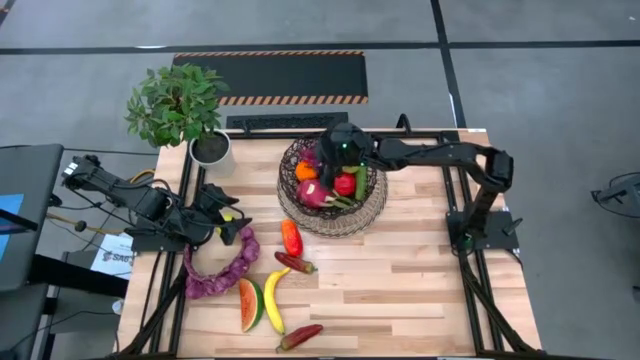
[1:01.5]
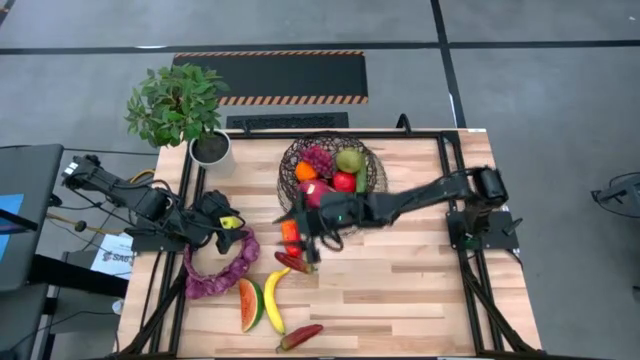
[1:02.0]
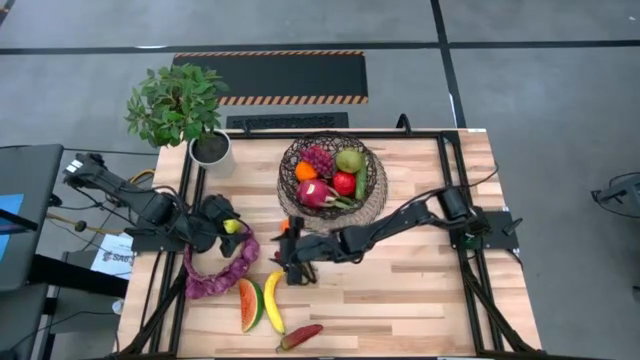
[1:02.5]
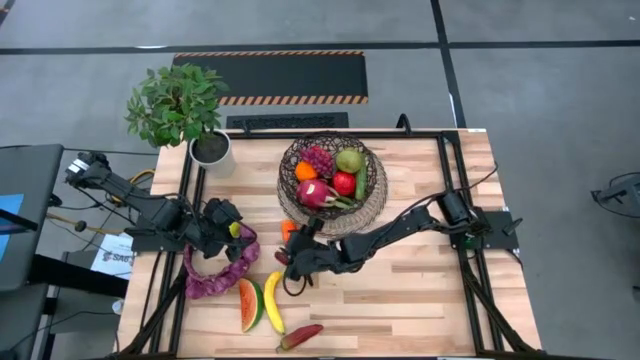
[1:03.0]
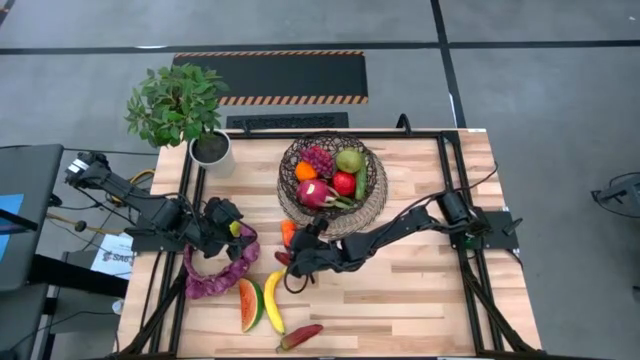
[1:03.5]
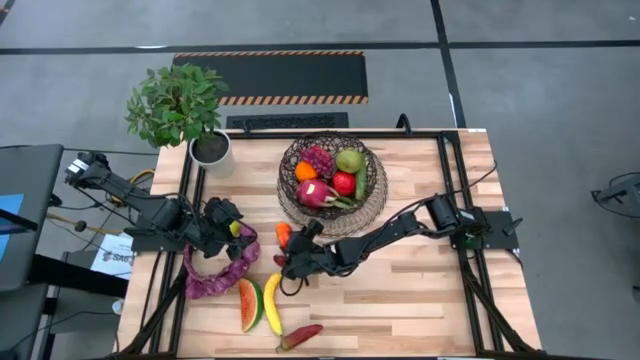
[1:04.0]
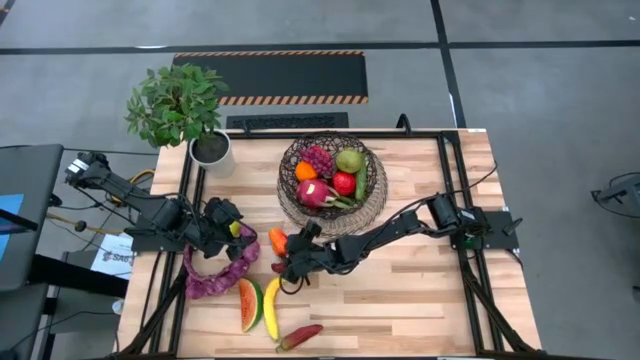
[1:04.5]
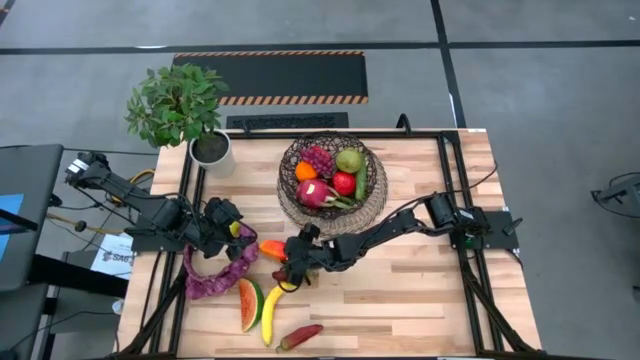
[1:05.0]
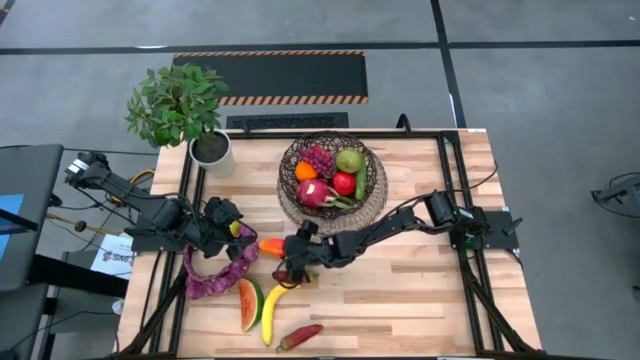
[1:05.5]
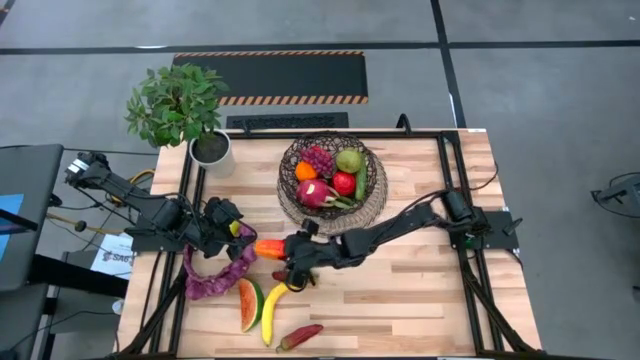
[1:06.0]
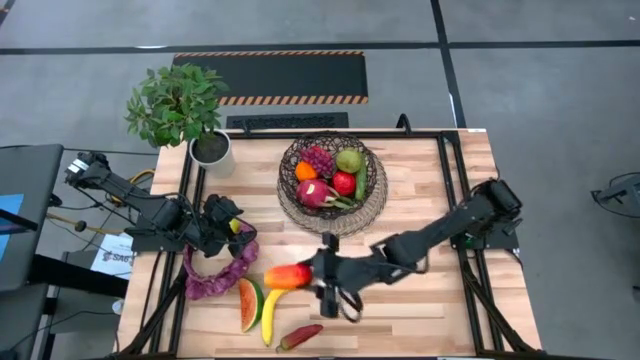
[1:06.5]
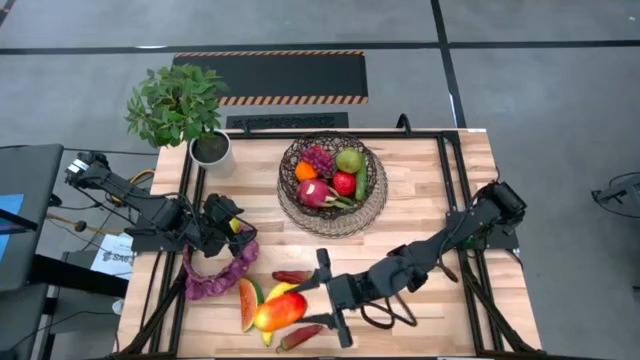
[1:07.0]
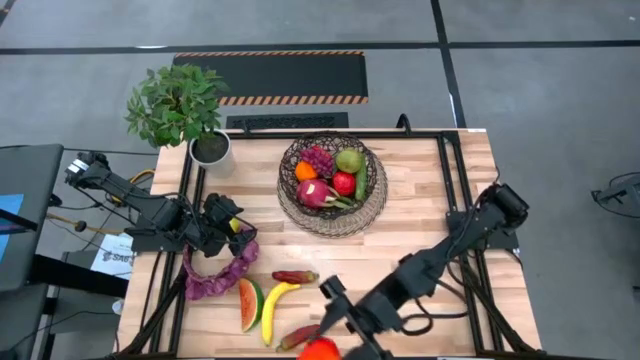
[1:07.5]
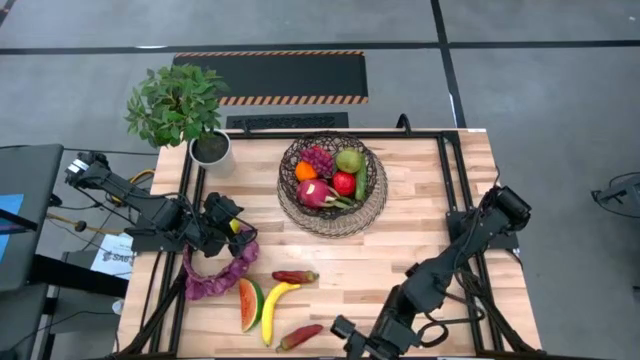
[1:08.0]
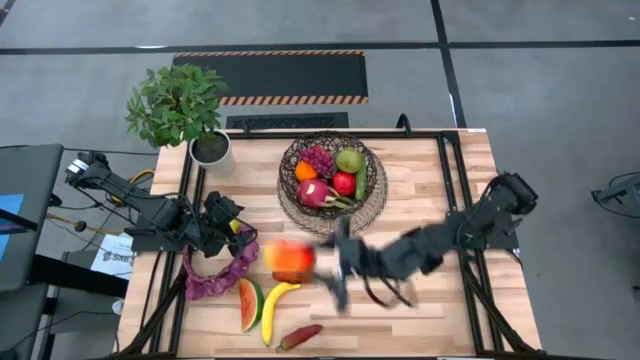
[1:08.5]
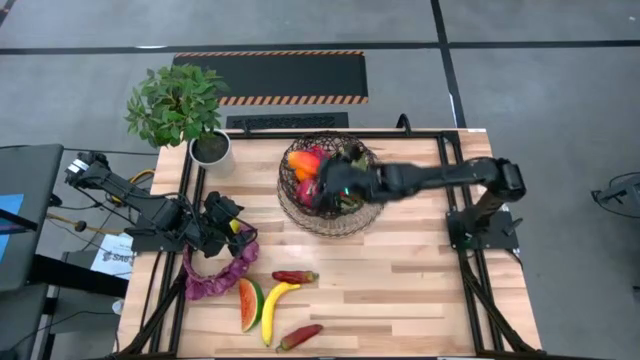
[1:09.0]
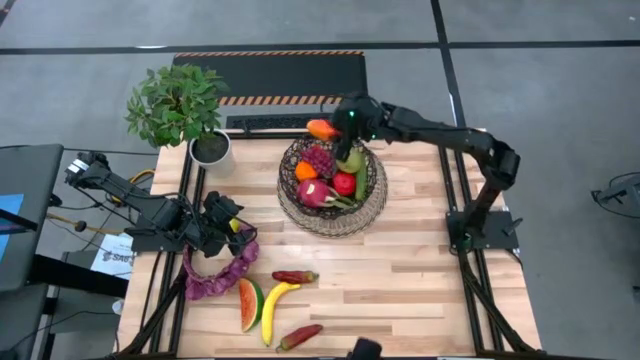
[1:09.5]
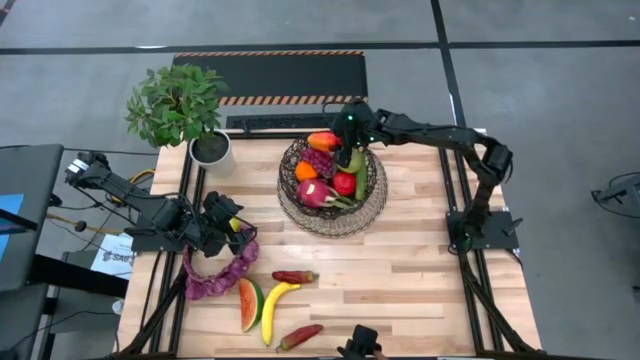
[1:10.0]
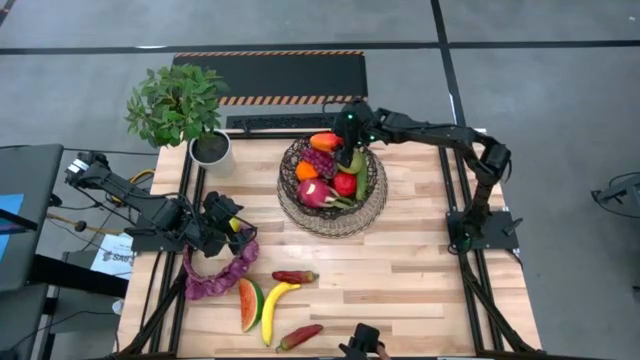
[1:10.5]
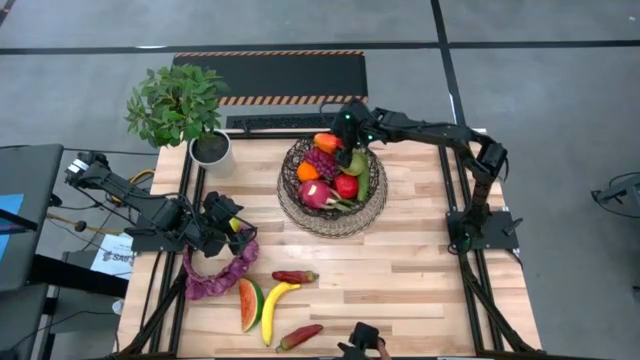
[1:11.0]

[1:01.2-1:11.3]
Task: Build produce basket
Put the mango into the basket

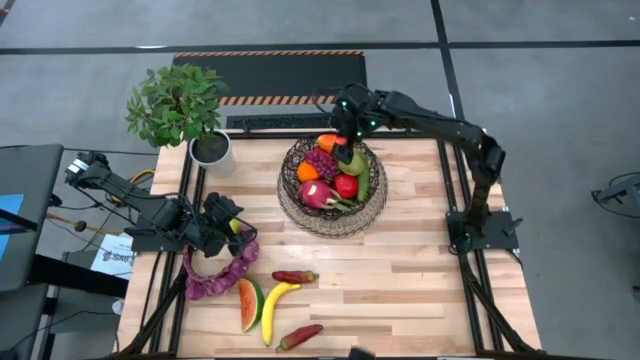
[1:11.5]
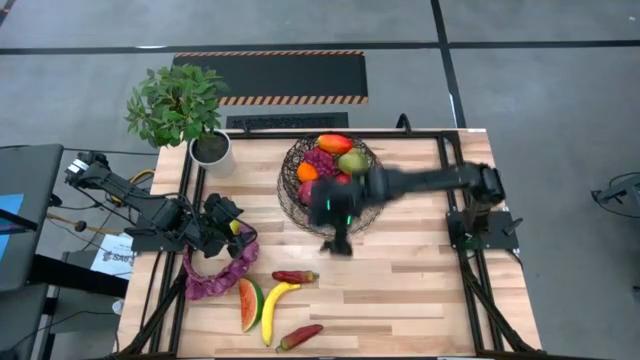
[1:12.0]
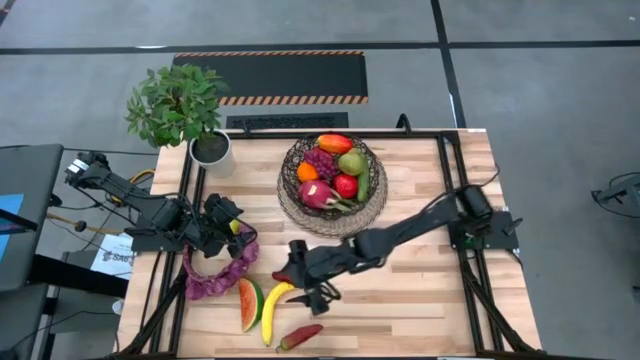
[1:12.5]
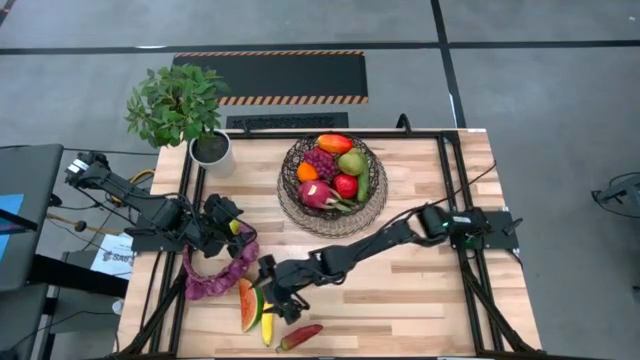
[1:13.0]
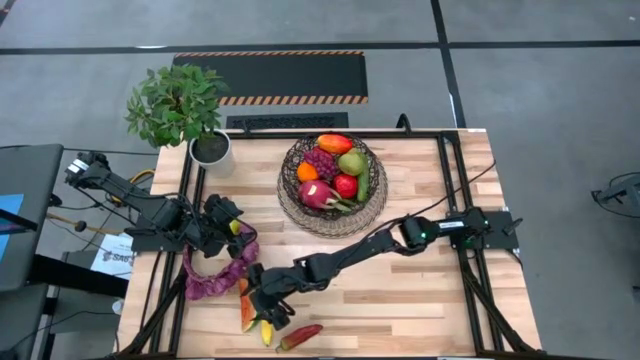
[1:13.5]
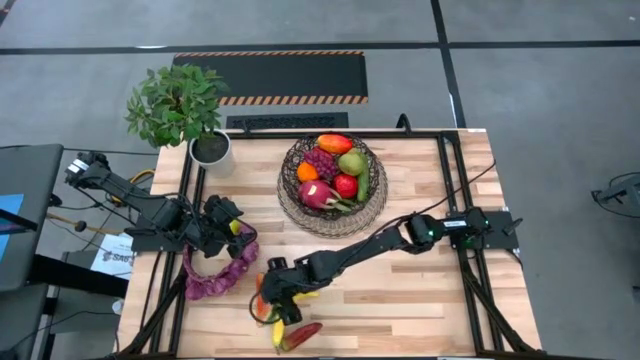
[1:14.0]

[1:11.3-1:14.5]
Move the sliced watermelon to the center of the table

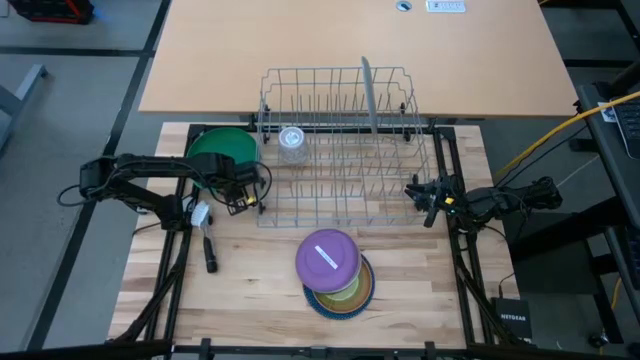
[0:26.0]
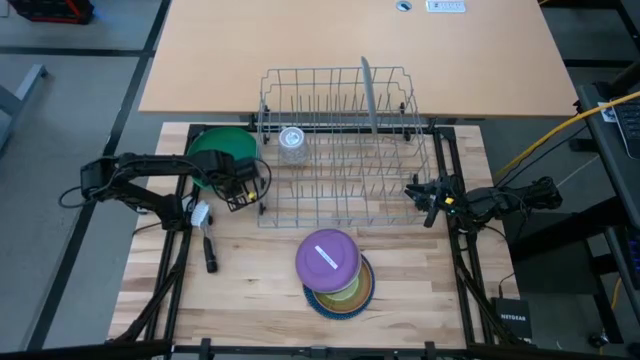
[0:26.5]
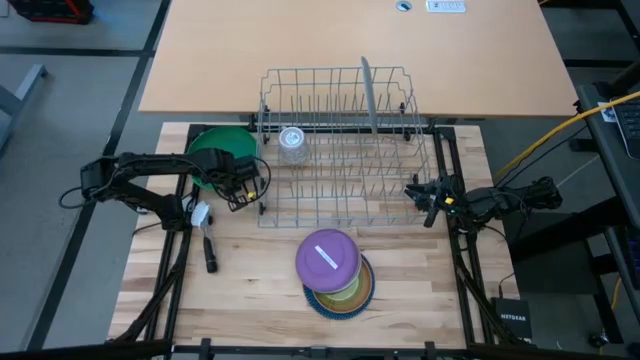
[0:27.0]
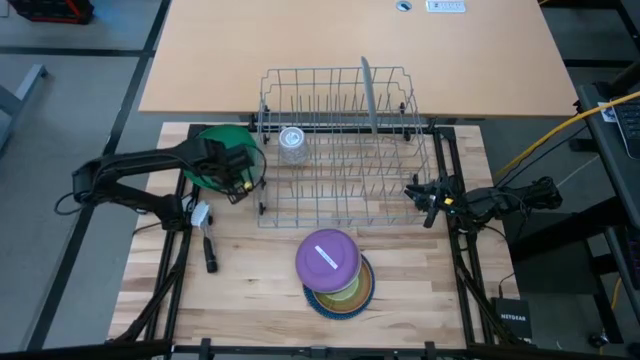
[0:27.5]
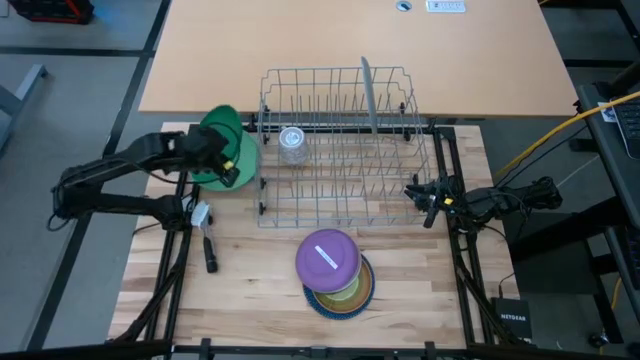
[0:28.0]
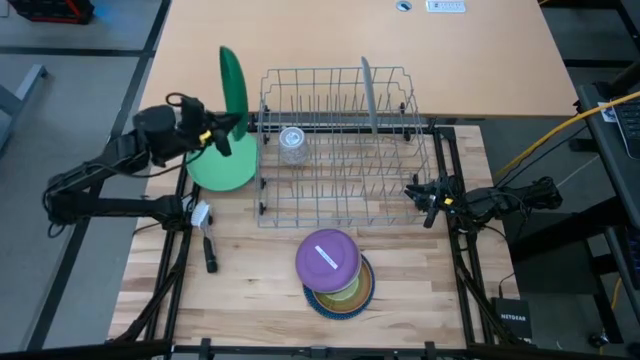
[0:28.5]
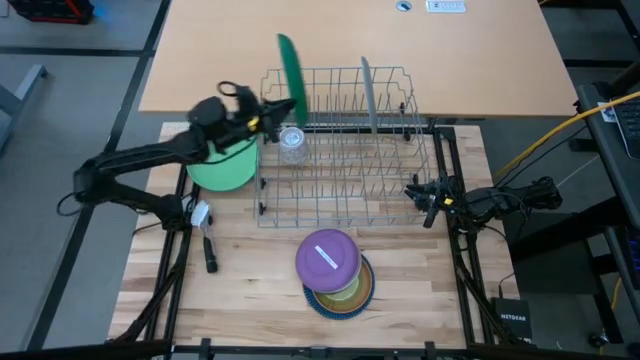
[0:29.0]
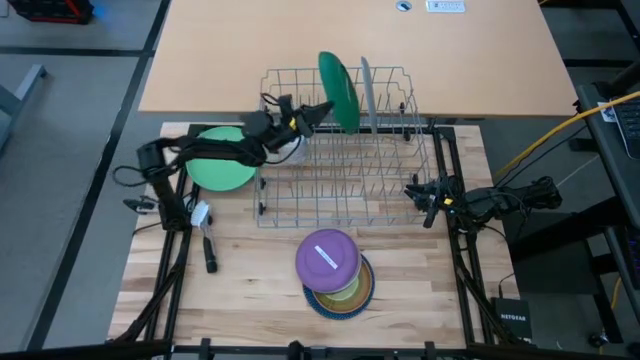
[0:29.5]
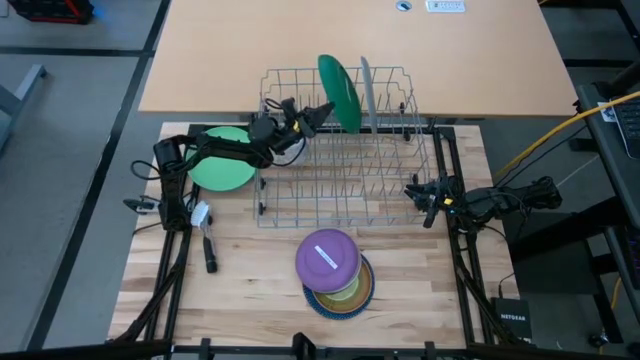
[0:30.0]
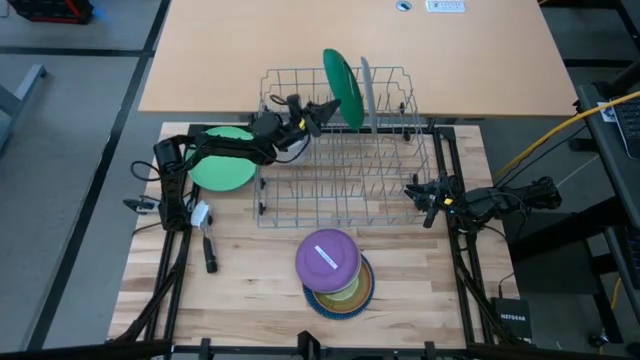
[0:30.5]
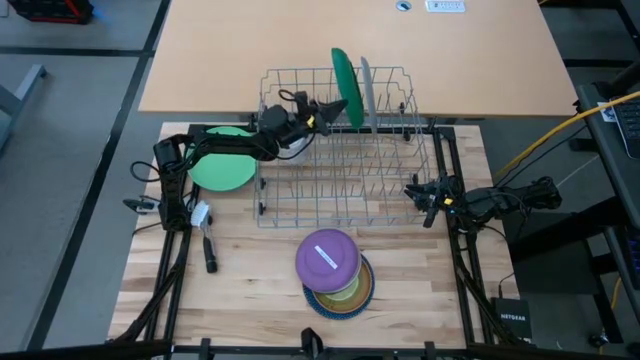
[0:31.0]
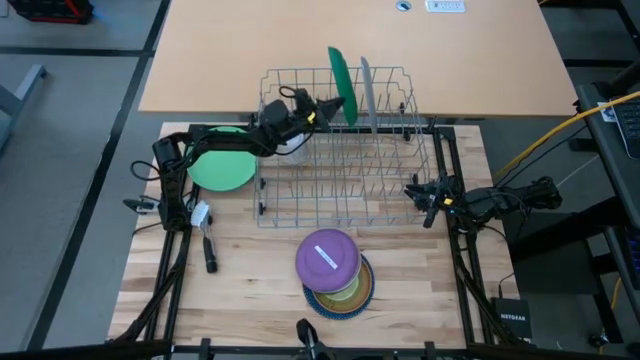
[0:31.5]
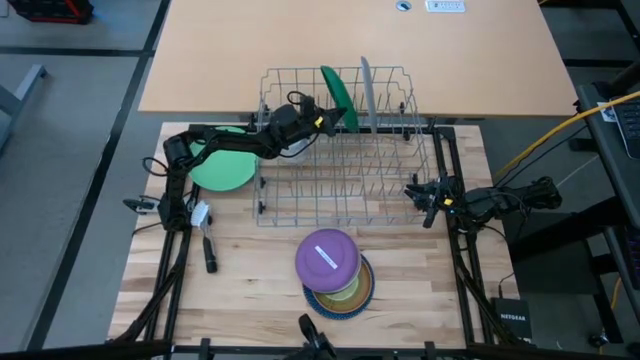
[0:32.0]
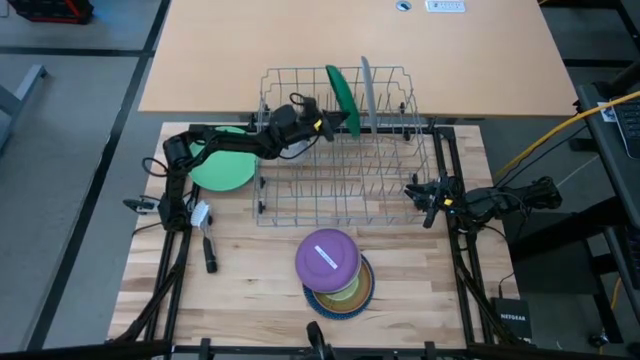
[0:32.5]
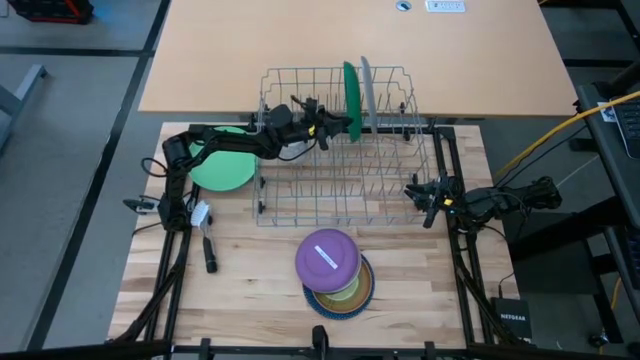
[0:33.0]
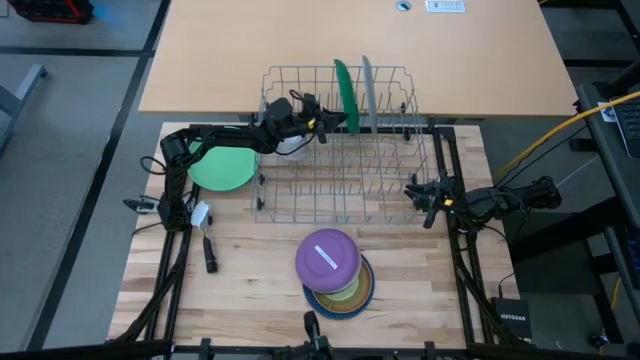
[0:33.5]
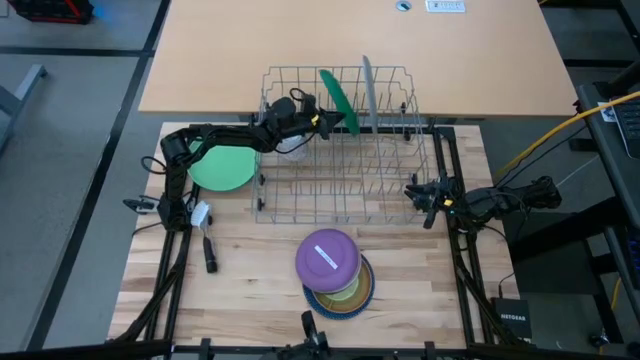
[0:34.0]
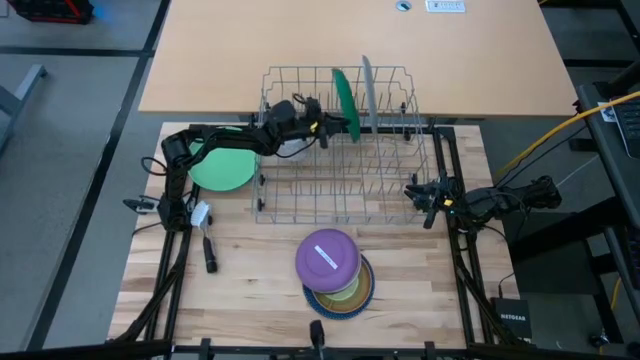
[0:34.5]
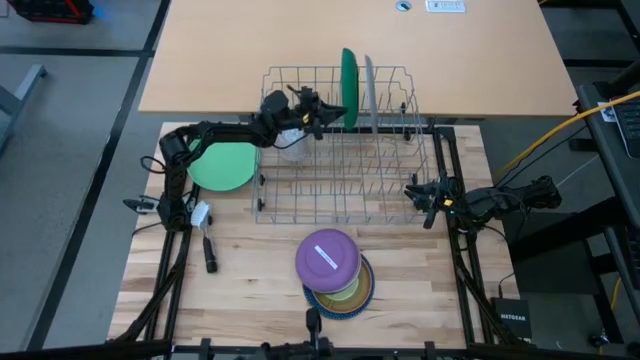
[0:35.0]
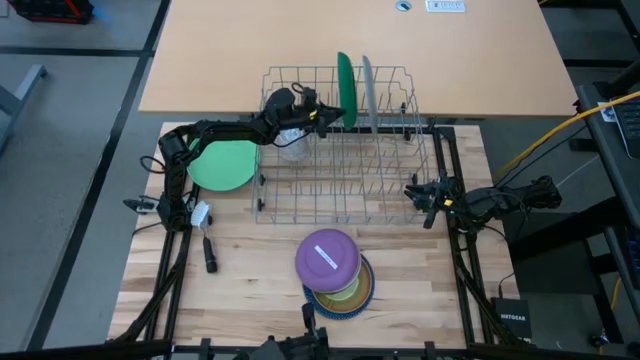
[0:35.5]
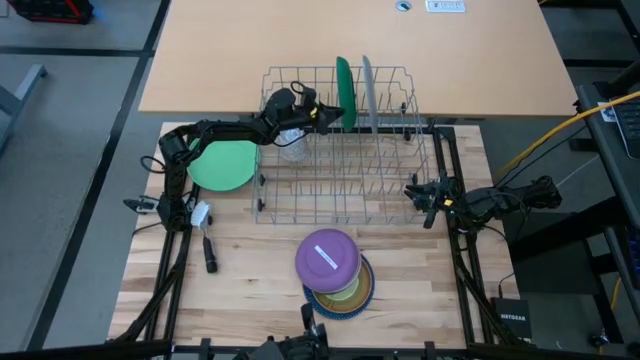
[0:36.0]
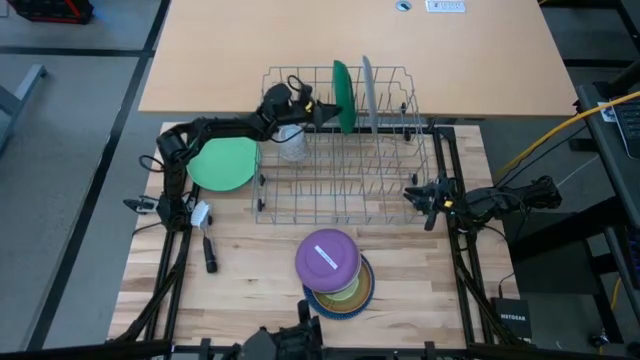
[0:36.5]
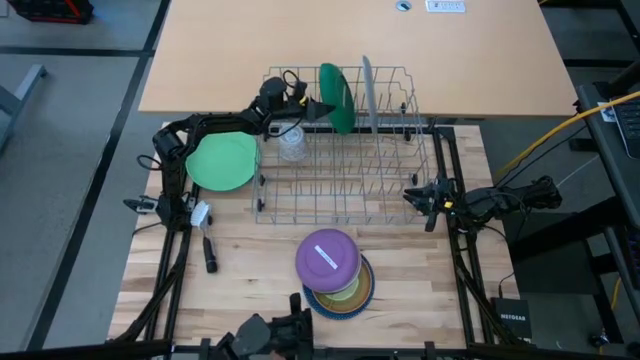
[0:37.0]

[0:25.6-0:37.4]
Task: Sort dishes
Put the dark green plate in the dish rack
